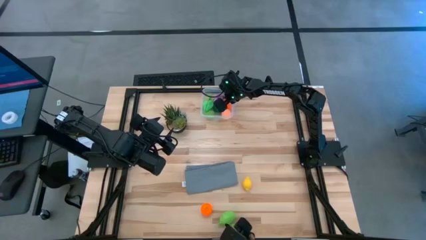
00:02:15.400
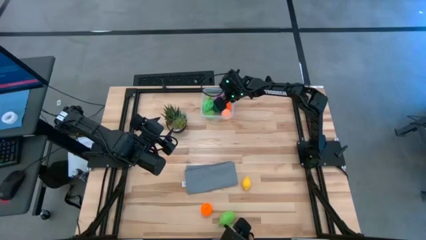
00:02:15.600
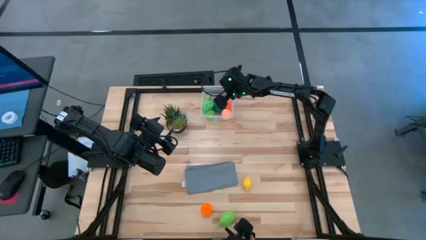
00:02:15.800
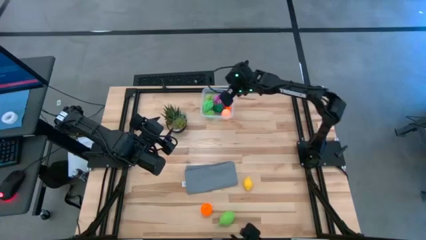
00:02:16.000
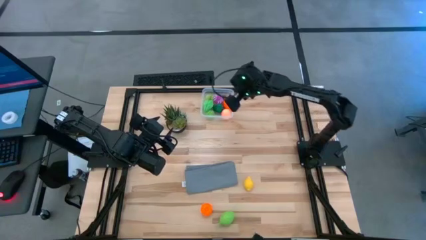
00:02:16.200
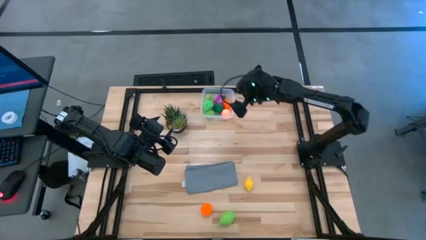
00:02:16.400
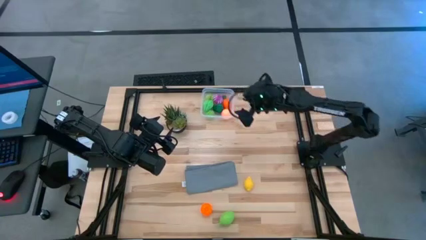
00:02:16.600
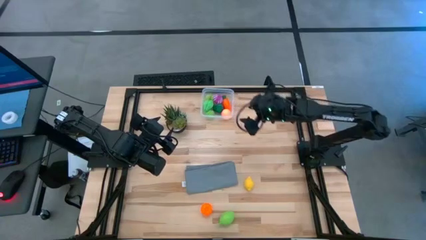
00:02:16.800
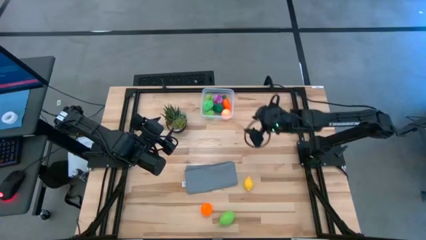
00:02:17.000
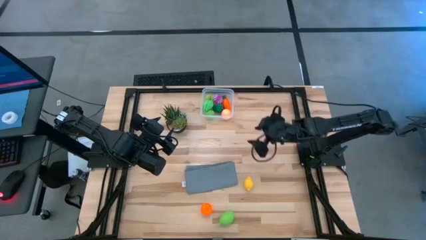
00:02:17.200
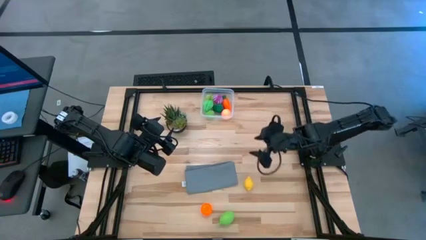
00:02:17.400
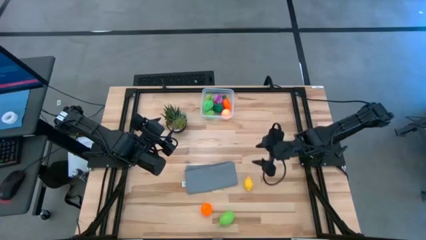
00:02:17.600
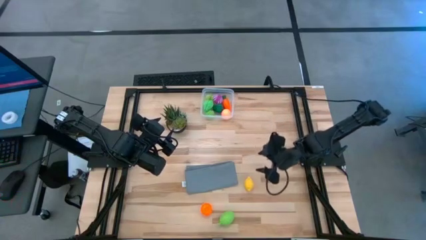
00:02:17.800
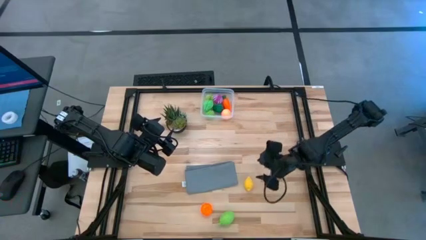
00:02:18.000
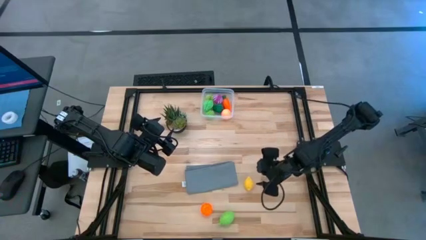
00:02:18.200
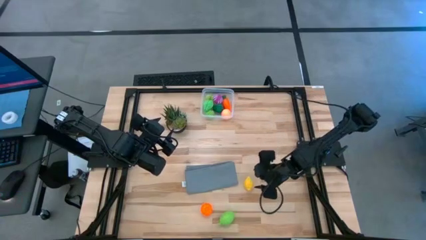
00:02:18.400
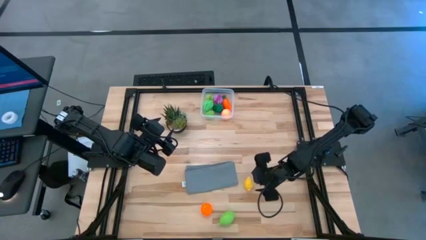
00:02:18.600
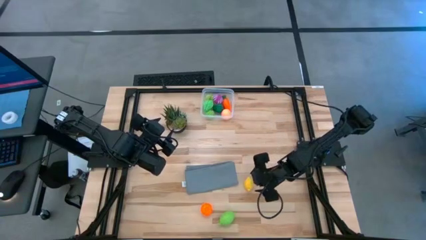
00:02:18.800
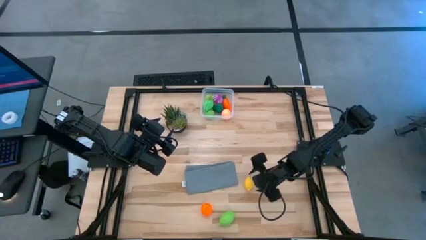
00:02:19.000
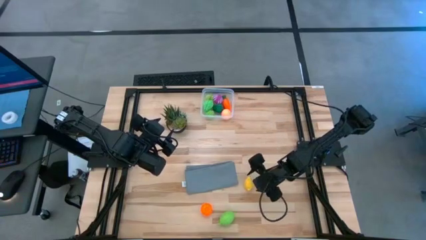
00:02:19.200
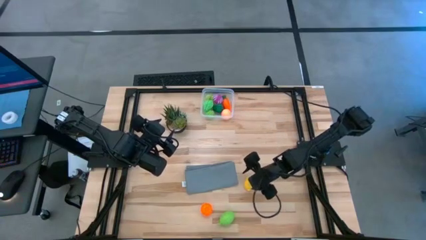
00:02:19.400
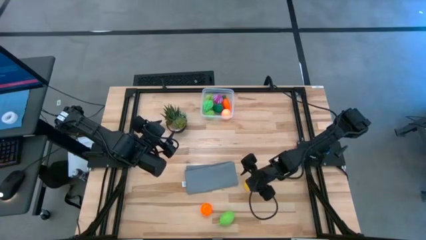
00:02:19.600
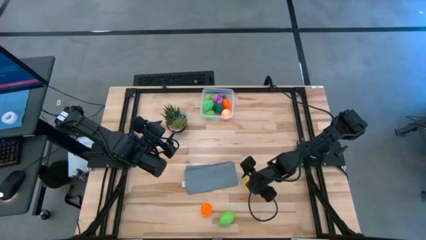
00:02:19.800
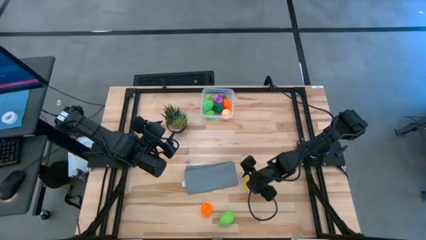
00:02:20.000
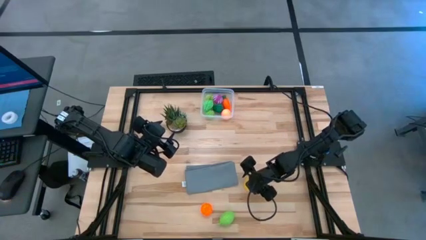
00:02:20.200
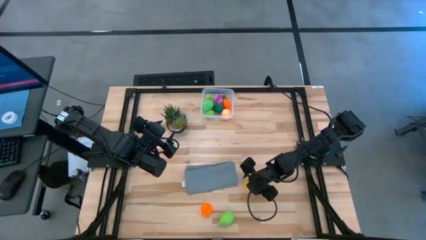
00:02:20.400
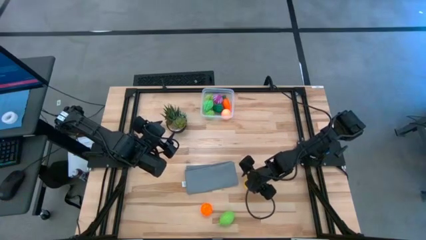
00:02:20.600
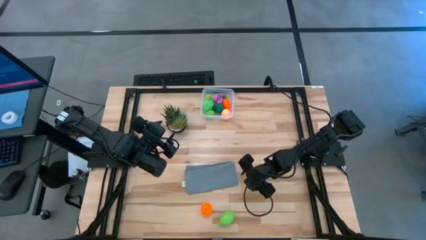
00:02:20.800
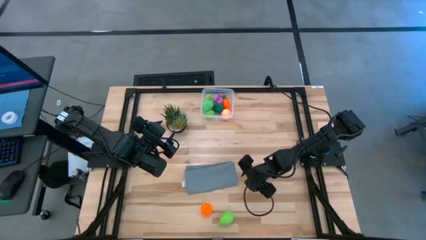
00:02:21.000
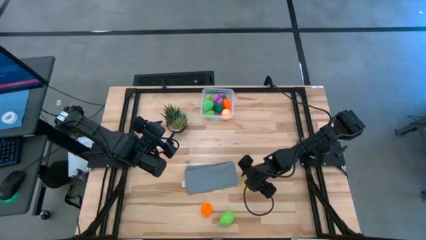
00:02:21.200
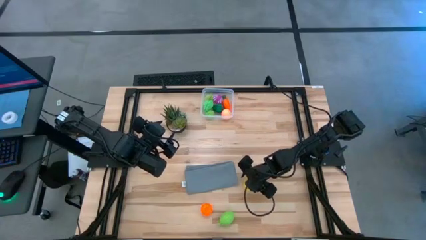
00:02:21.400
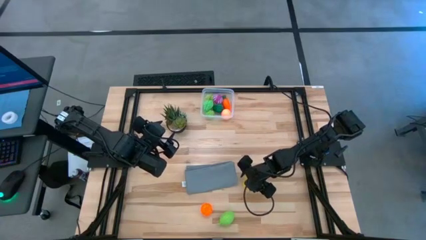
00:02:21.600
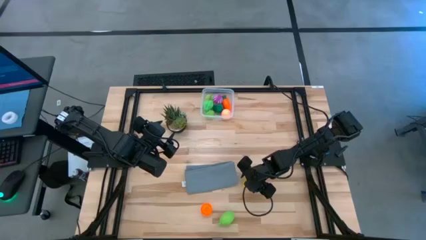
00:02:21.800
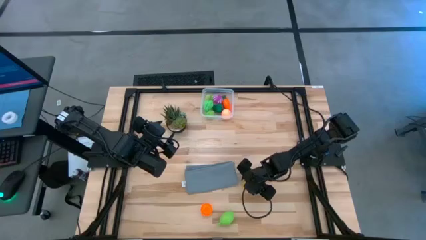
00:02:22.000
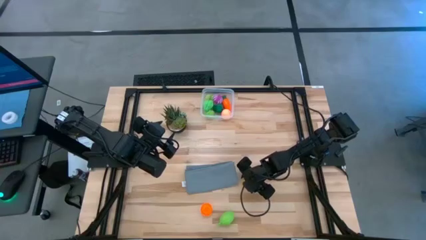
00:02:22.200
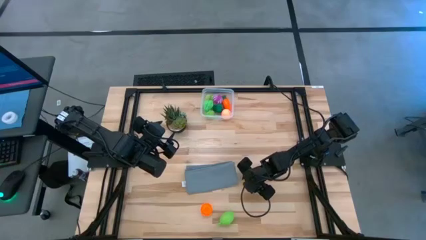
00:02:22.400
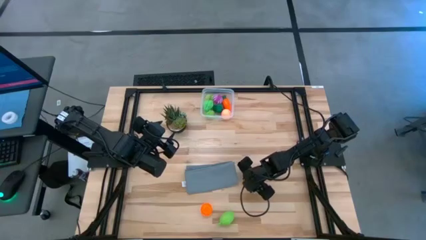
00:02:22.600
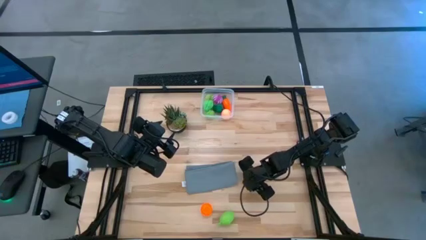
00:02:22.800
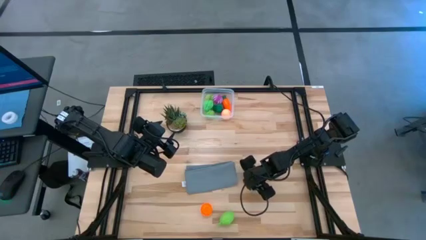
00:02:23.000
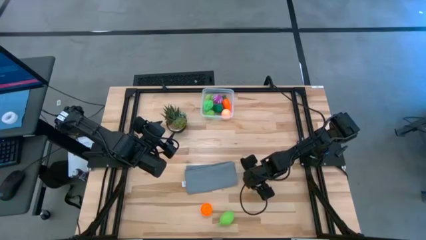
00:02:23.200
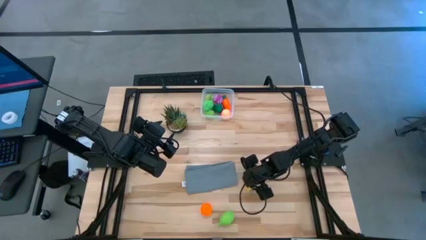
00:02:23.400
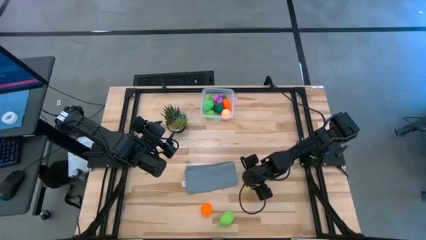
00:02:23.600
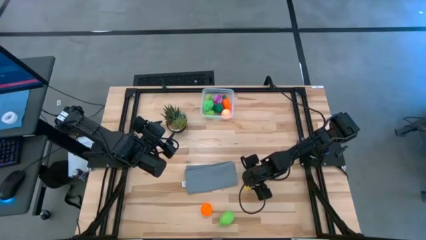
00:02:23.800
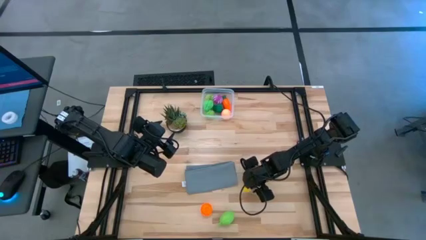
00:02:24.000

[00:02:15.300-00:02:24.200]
Task: Pick and placing Produce into tupperware
Put the lemon into the bin

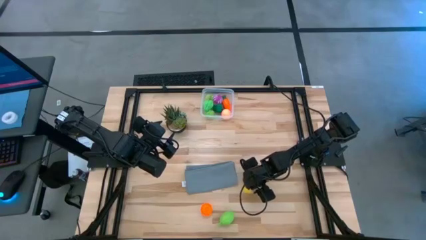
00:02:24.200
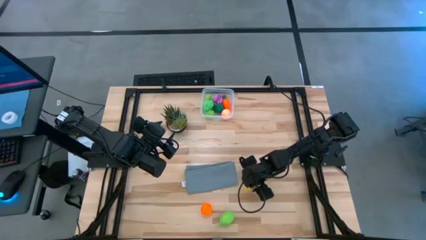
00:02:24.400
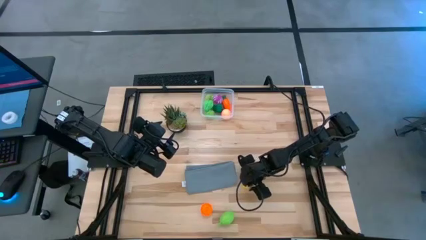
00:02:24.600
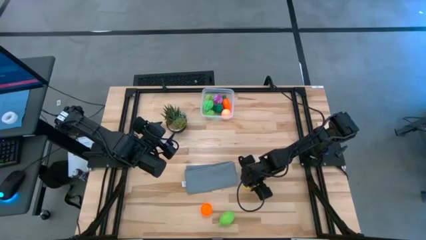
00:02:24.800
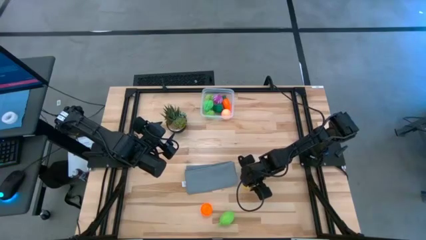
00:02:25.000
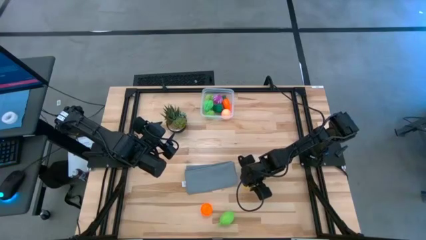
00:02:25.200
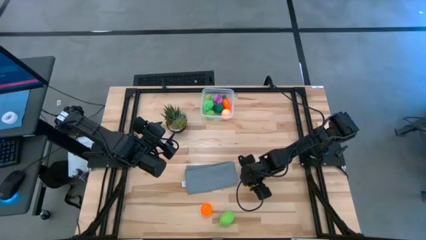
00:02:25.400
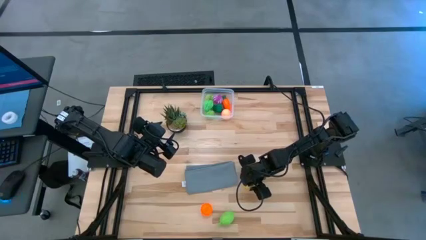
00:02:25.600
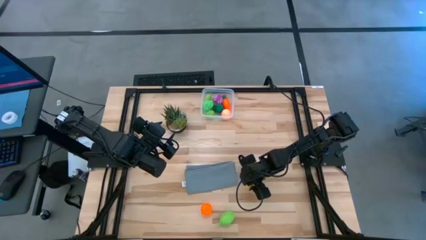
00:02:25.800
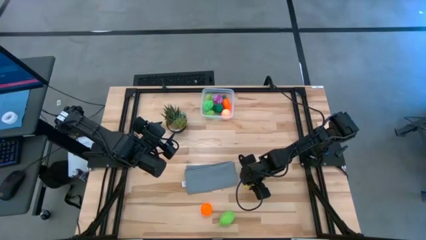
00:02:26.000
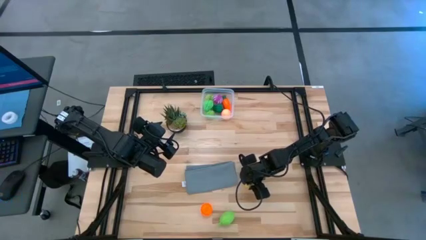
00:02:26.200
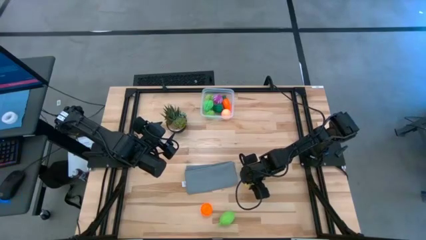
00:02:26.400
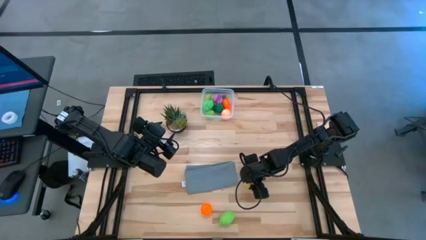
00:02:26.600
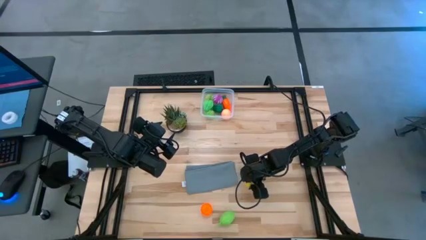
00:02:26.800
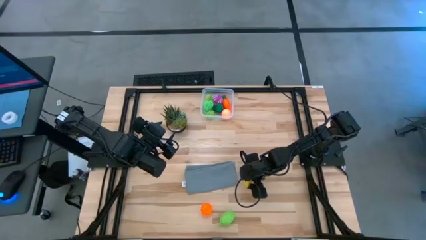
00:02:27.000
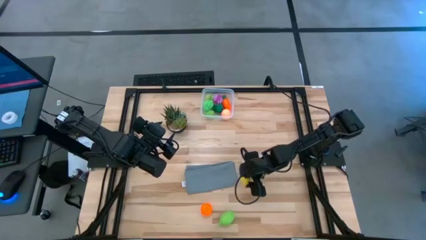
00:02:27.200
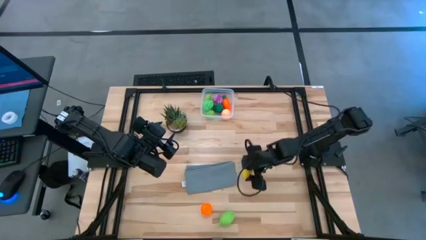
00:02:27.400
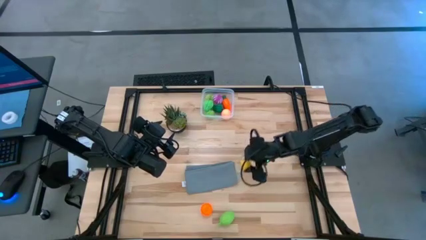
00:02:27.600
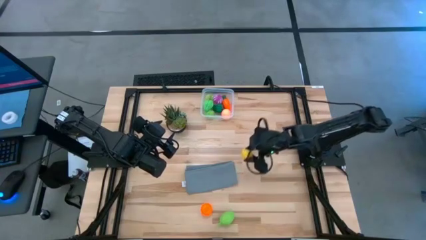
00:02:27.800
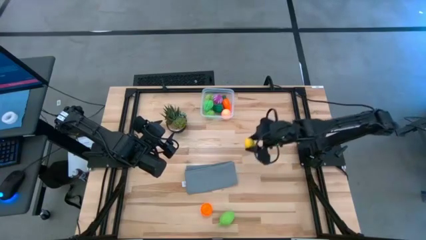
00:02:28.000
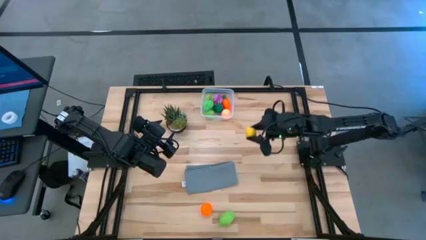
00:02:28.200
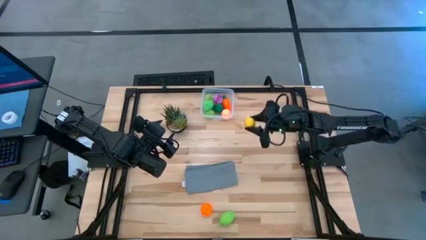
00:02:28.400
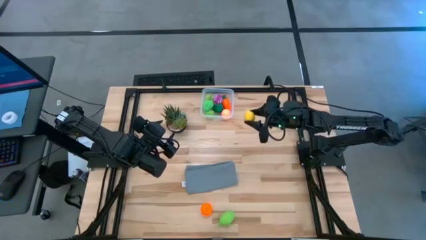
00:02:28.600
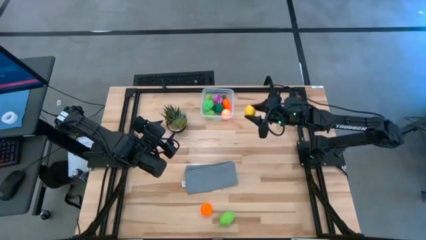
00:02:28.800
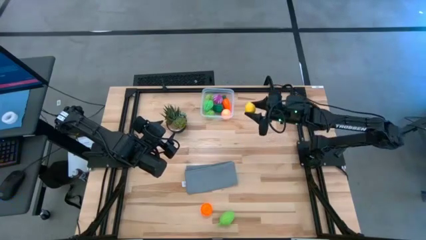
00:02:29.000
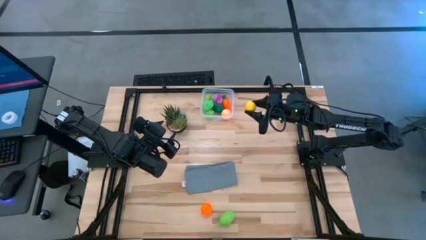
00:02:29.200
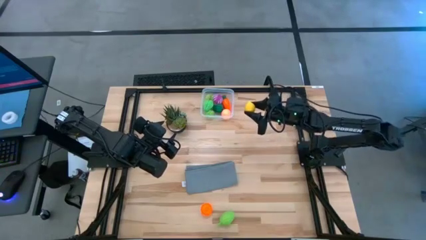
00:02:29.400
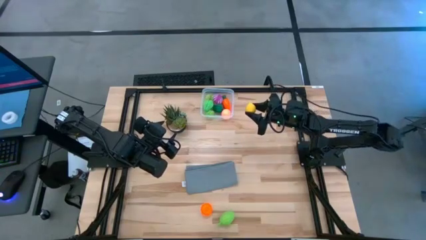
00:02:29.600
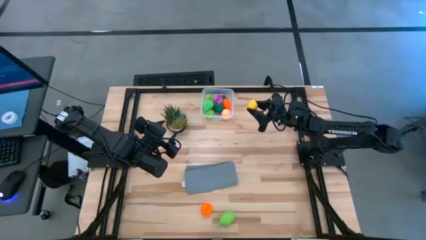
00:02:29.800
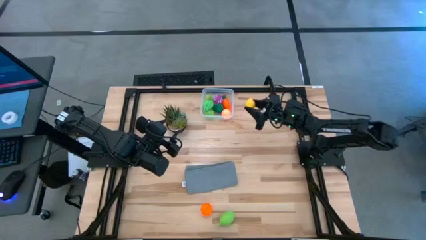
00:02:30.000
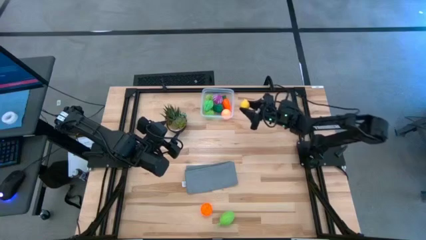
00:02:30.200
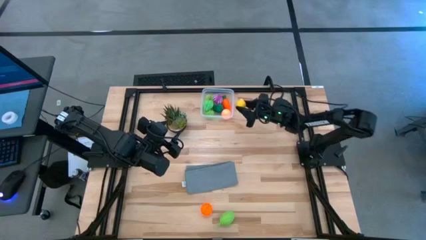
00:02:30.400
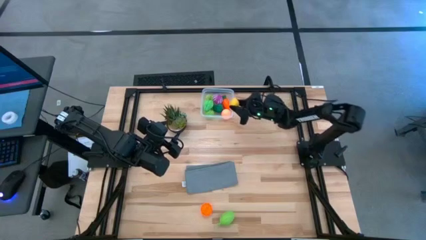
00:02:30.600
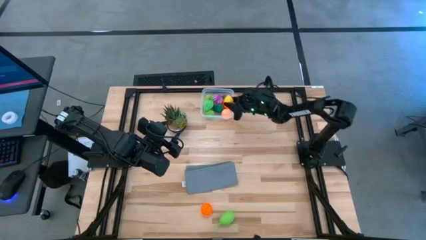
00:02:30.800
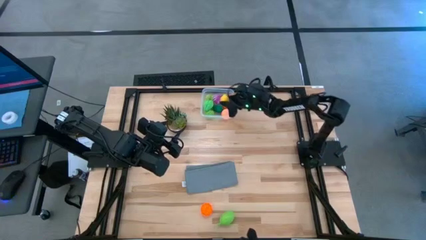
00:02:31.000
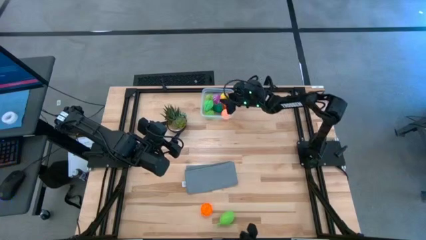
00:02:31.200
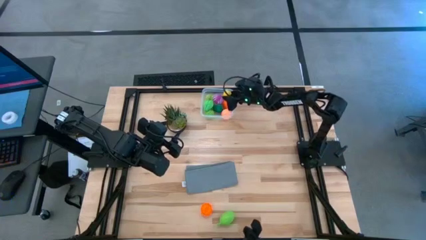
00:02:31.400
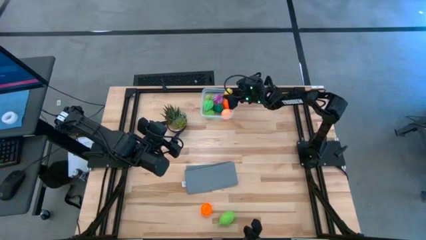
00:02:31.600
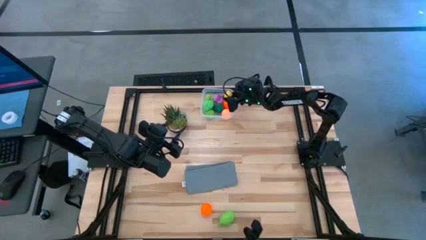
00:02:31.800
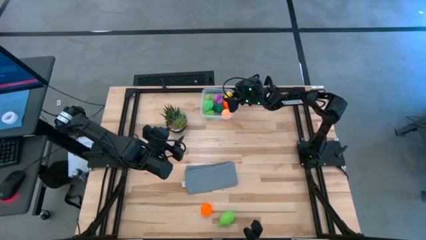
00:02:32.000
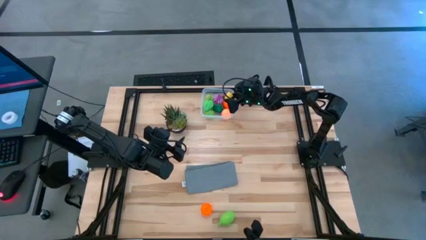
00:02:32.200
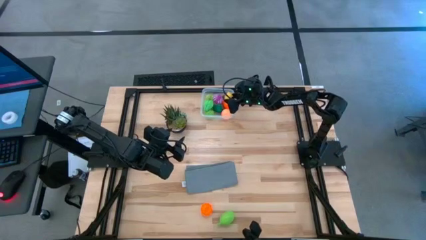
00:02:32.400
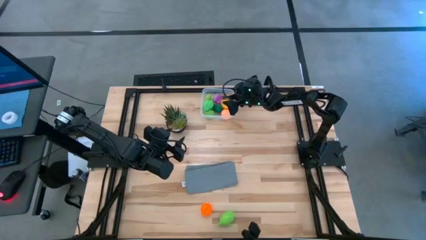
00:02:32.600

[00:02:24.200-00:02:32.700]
Put the lemon into the bin
